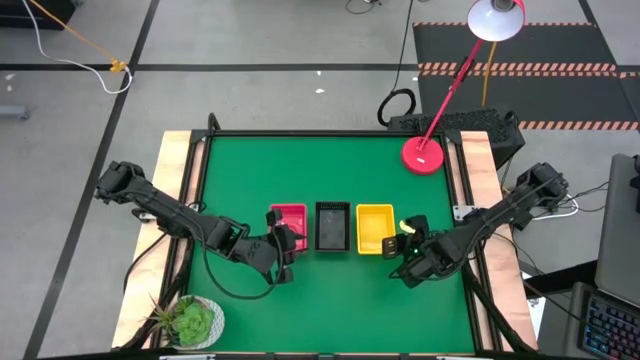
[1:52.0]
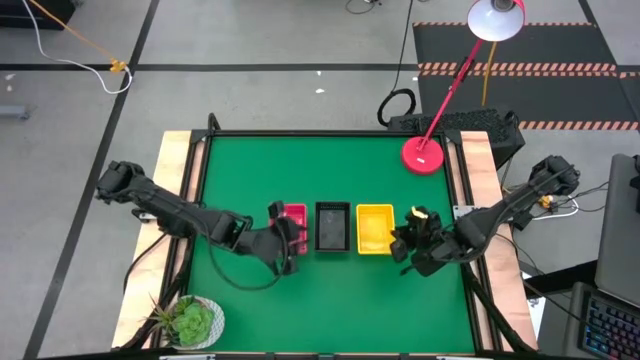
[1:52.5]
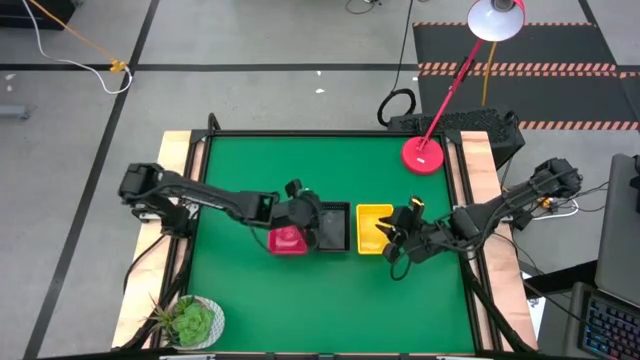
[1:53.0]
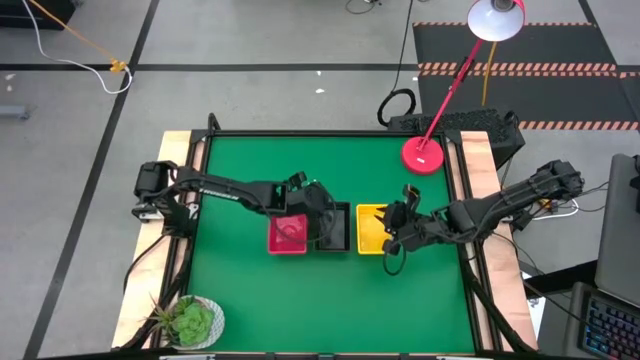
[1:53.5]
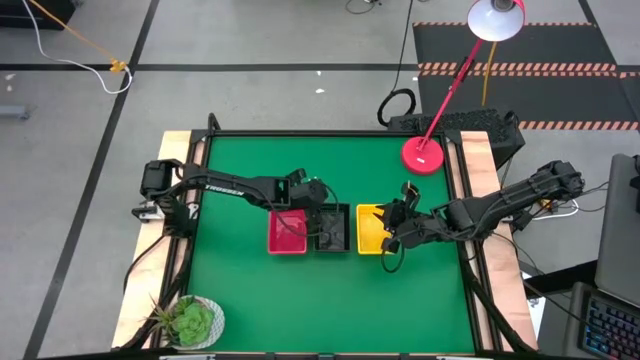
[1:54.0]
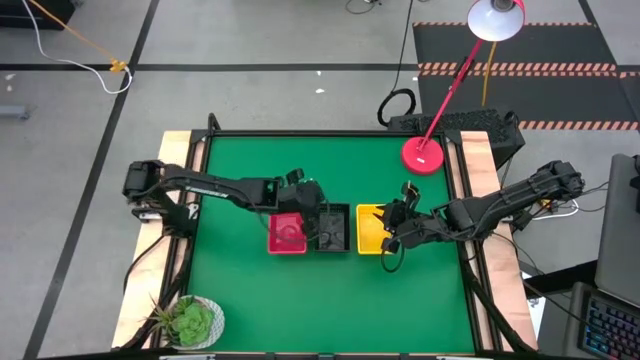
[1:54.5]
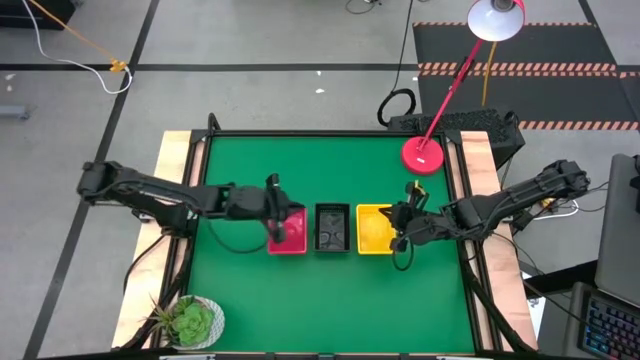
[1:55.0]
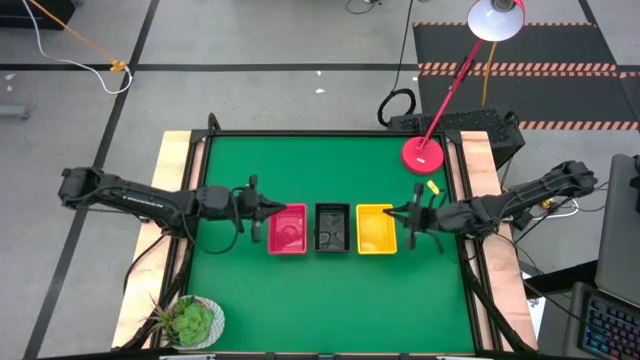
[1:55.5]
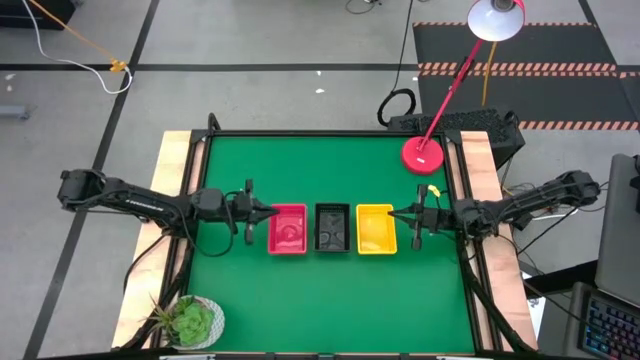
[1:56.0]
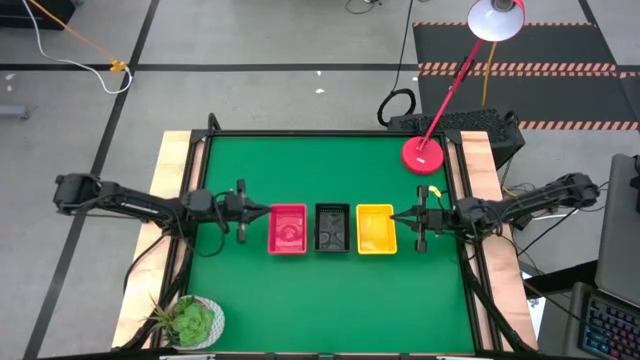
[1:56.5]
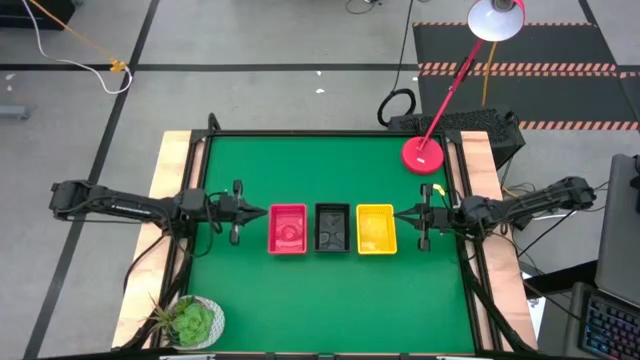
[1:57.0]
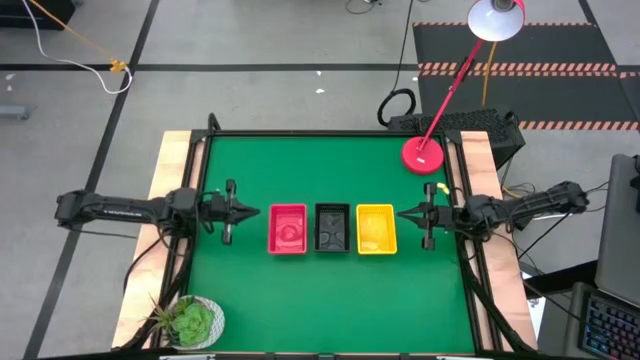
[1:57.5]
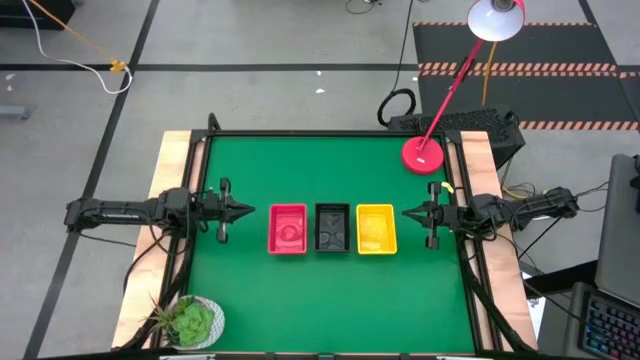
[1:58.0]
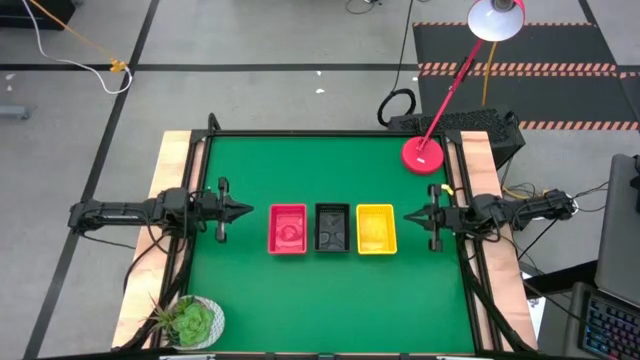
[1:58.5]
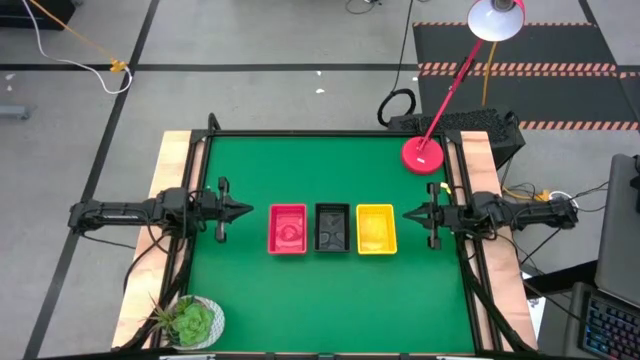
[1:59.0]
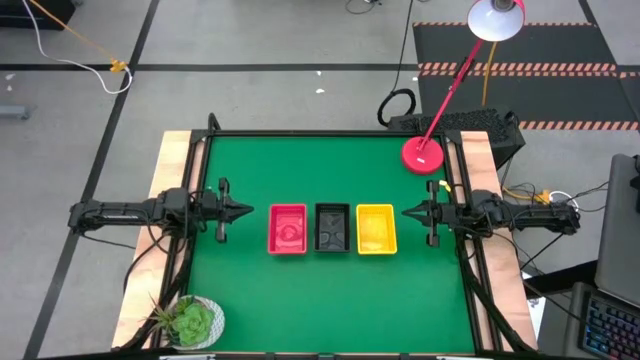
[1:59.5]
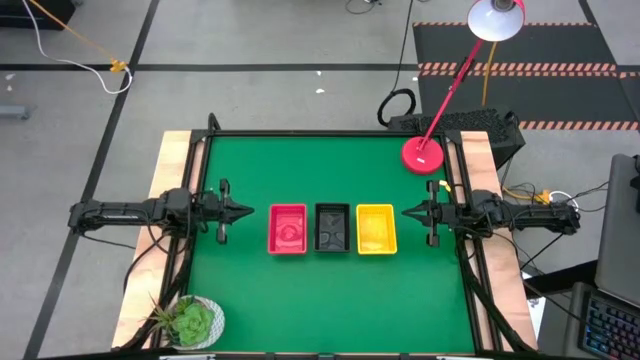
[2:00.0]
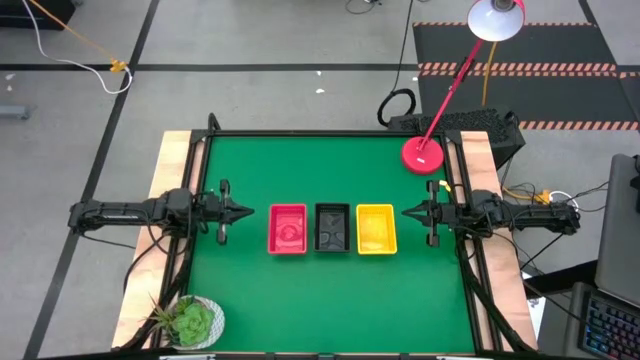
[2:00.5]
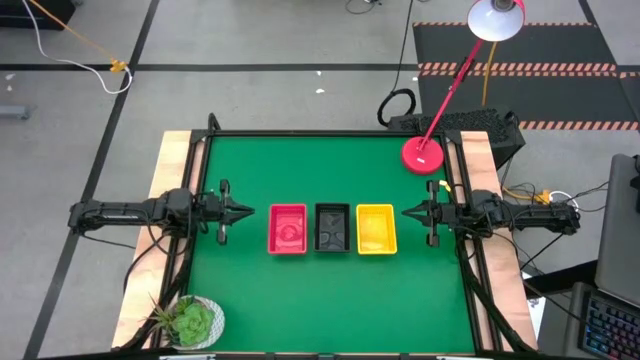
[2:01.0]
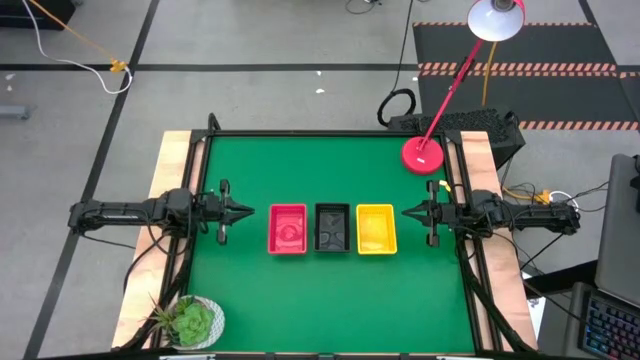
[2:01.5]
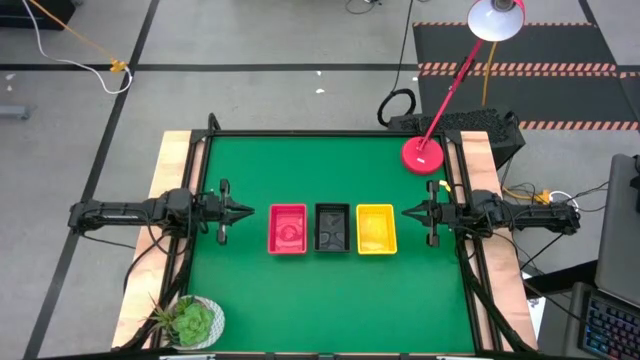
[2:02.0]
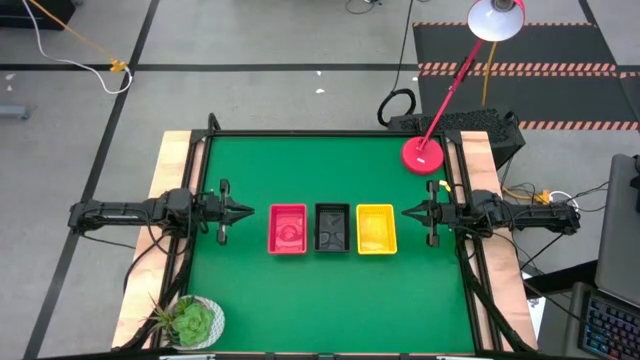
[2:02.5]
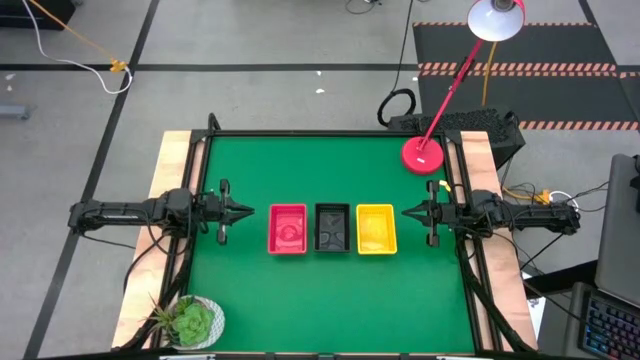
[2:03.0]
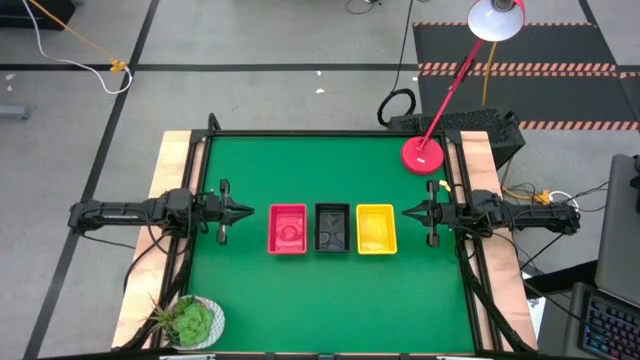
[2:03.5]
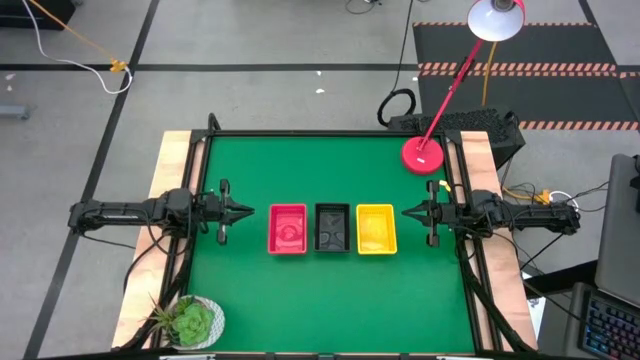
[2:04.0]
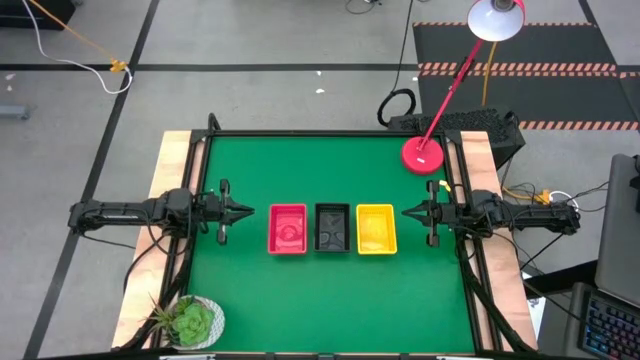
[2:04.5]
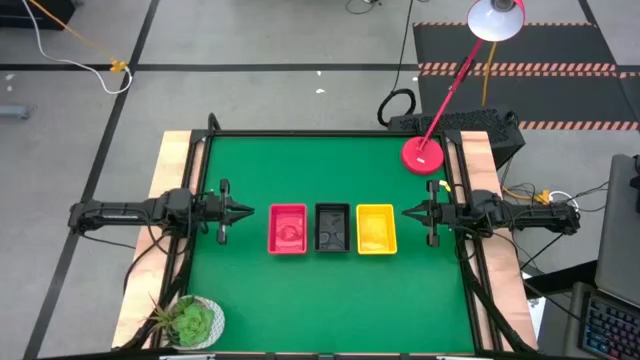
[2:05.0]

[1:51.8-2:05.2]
Return To Home Position
